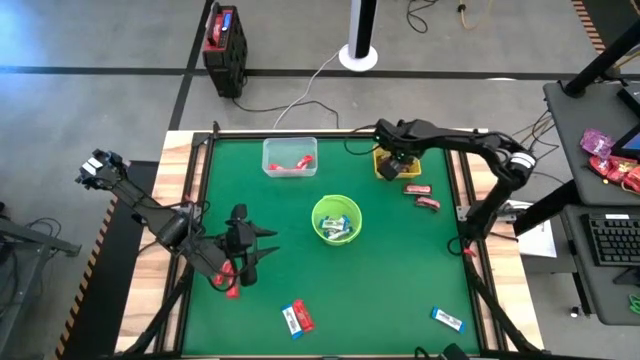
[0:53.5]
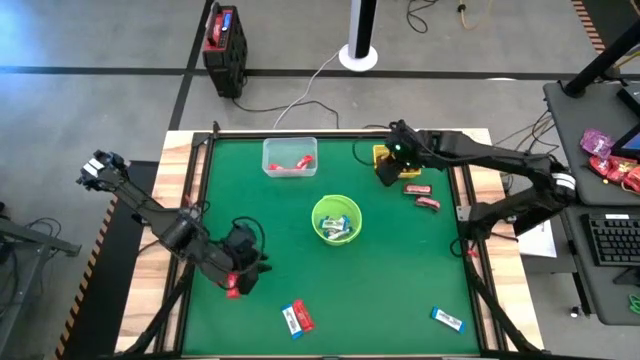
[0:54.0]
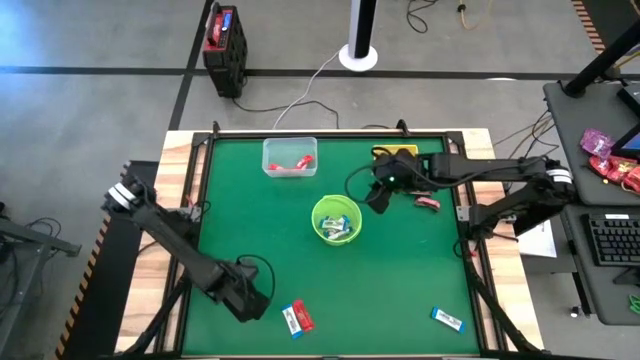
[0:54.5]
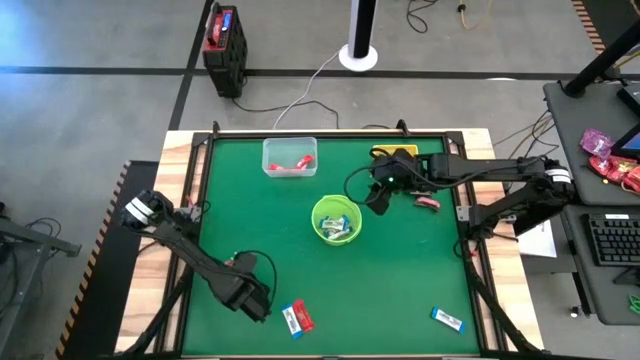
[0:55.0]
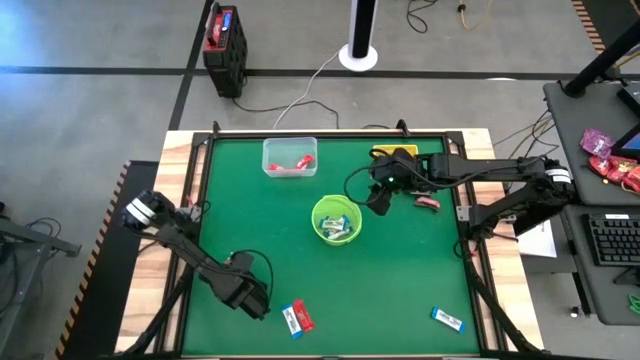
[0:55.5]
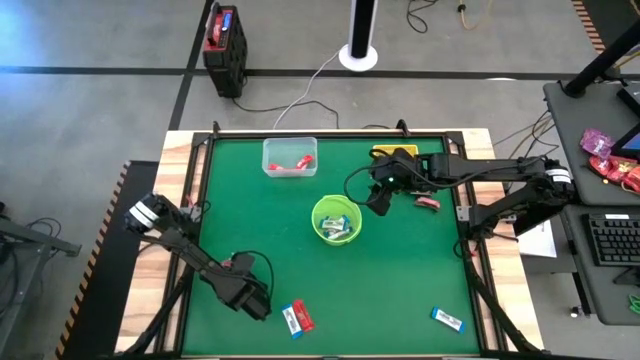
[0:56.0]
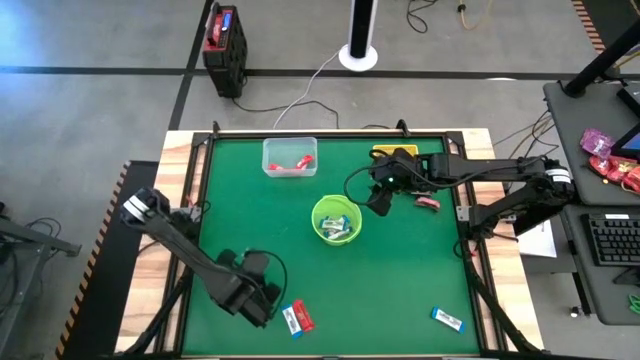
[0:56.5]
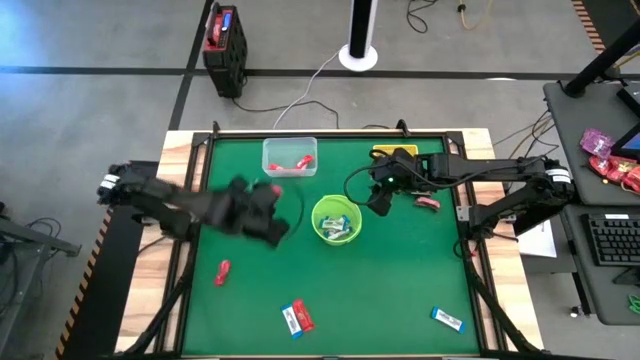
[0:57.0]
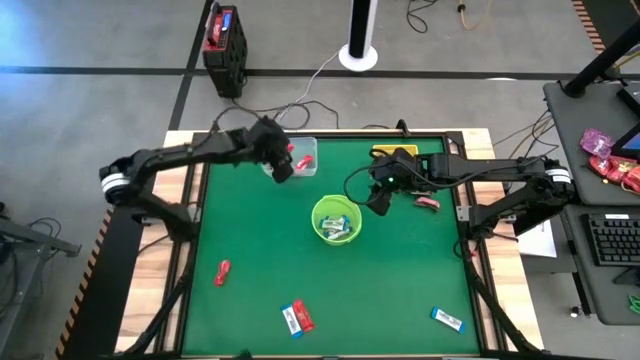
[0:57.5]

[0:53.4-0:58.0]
Task: Sort candy by brand, put in halloween buckets
Put the red chocolate into the transparent bin

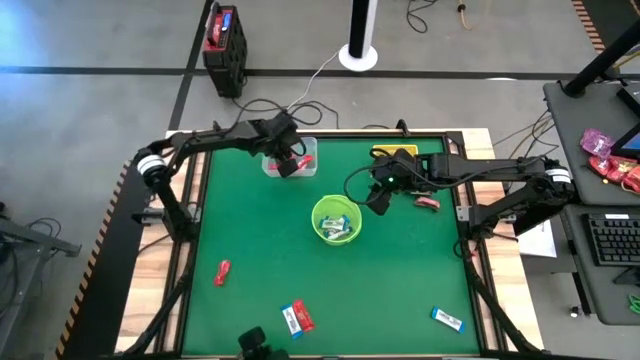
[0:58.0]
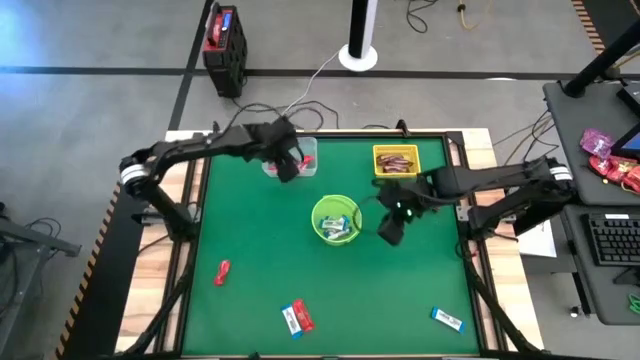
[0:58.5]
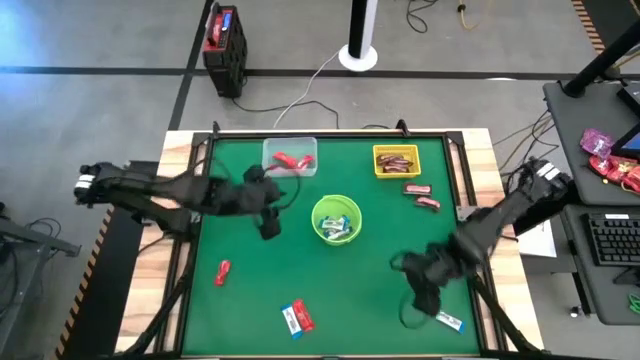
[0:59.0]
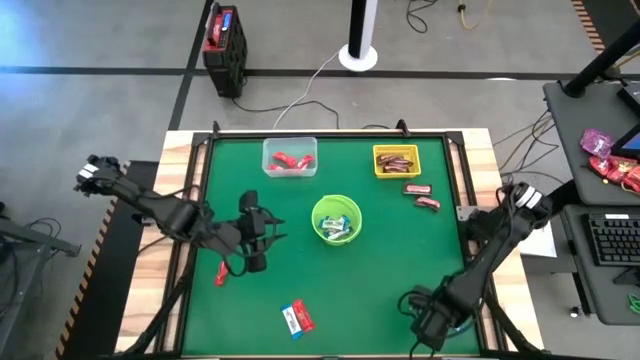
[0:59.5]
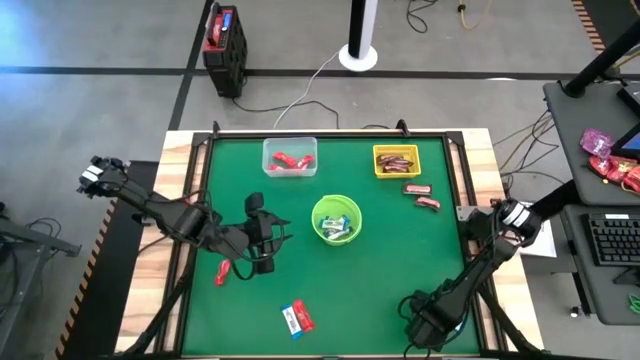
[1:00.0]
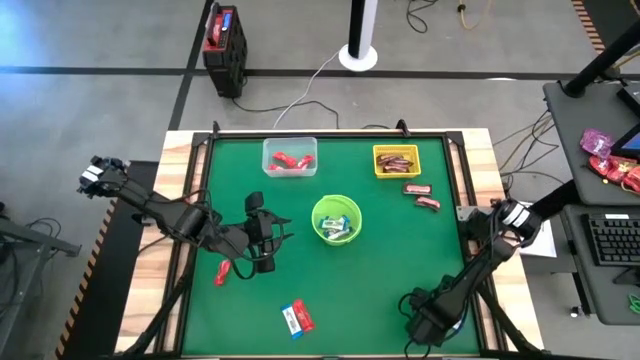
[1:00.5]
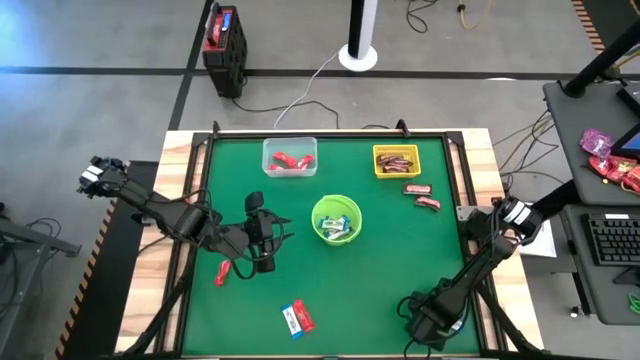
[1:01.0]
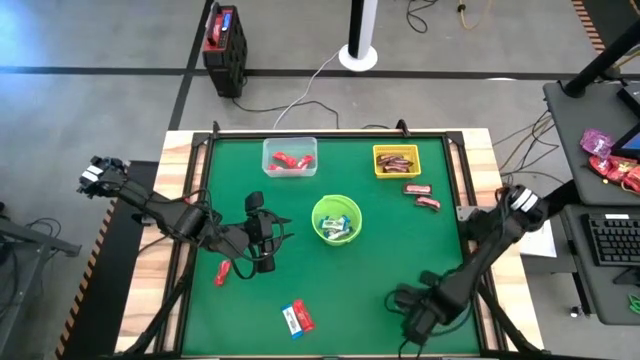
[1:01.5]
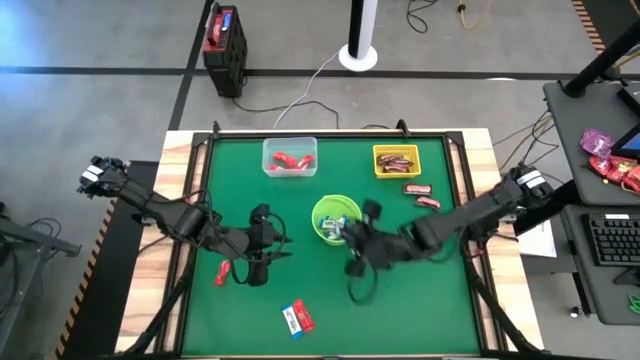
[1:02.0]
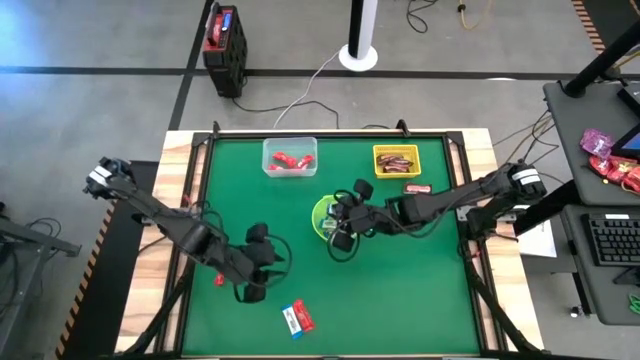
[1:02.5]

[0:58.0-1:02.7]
Put the white chocolate into the green bucket

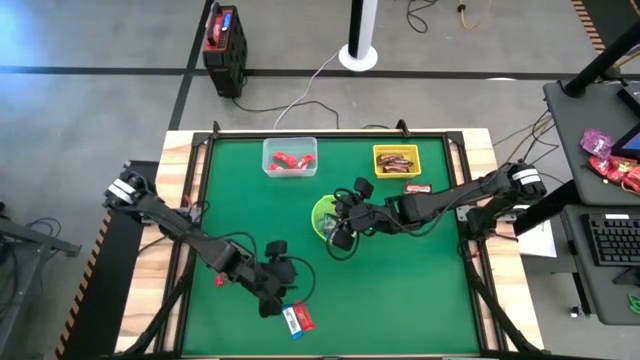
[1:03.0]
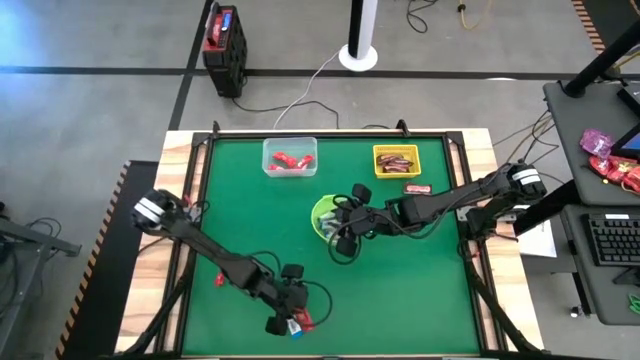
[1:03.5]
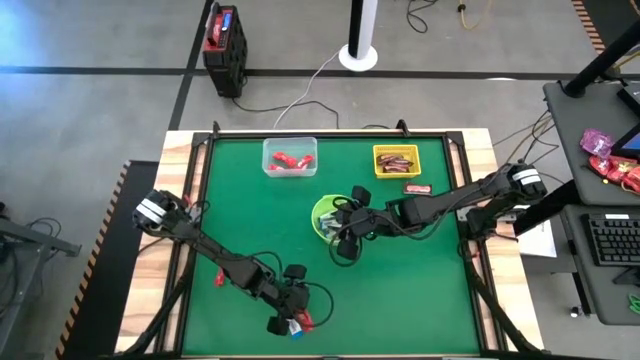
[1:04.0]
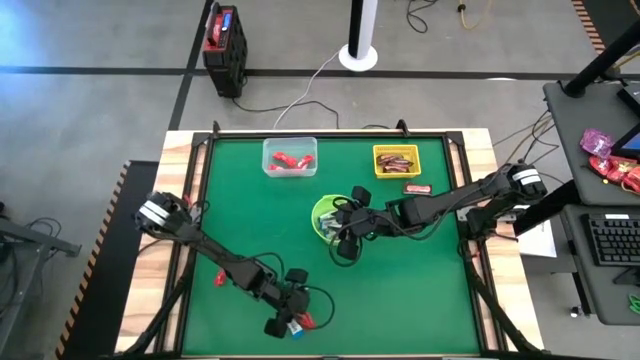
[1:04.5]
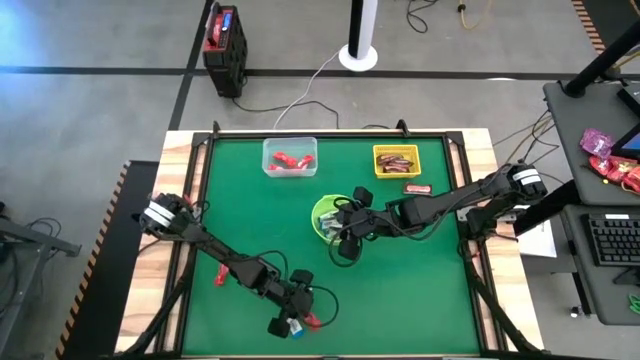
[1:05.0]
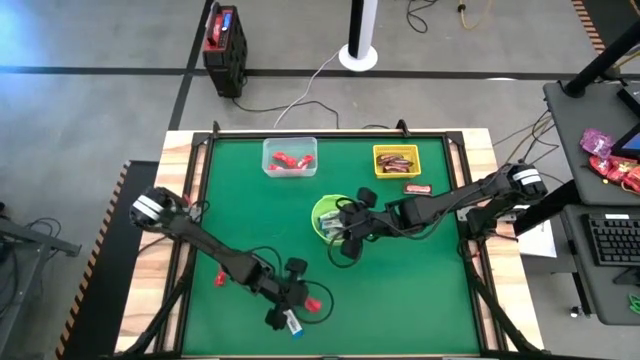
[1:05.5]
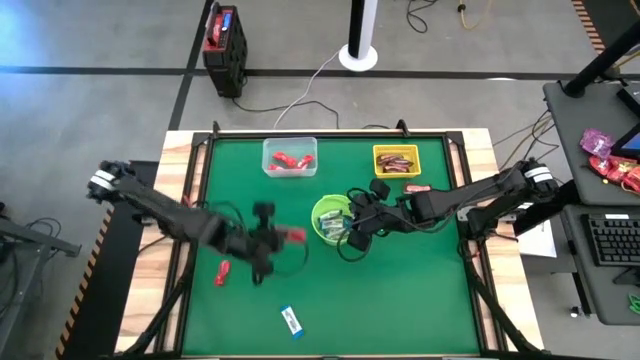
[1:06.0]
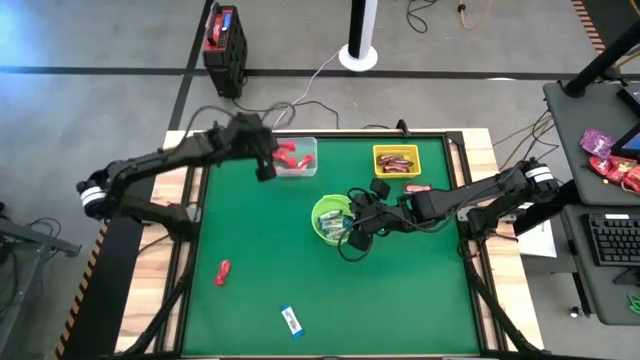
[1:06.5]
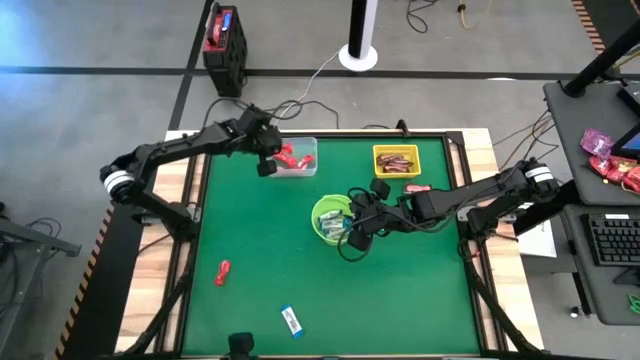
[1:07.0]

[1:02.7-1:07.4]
Put the red chocolate into the transparent bin

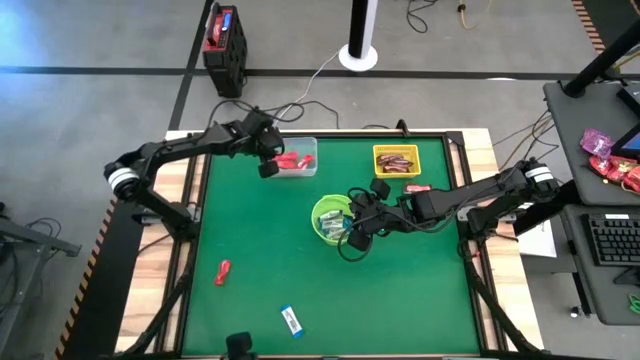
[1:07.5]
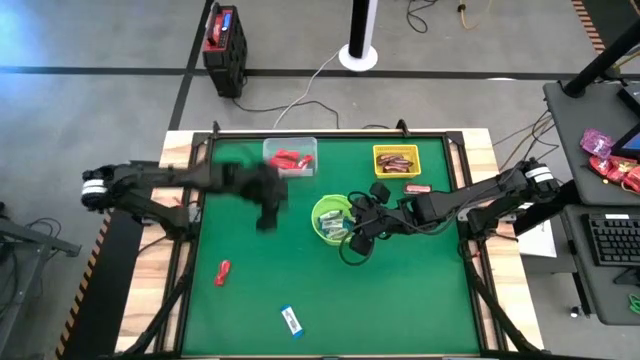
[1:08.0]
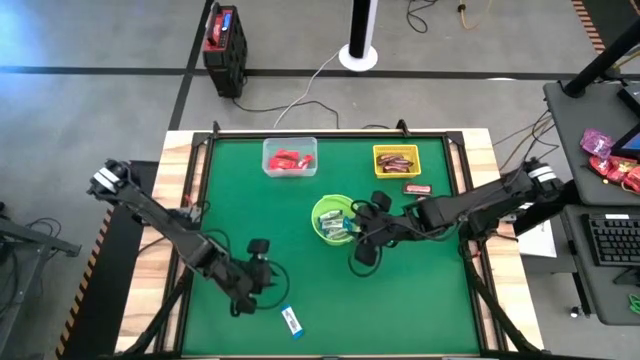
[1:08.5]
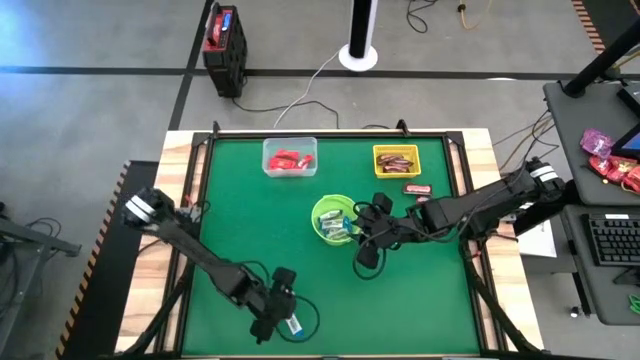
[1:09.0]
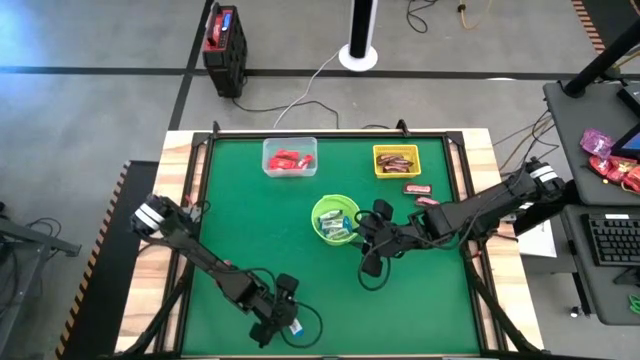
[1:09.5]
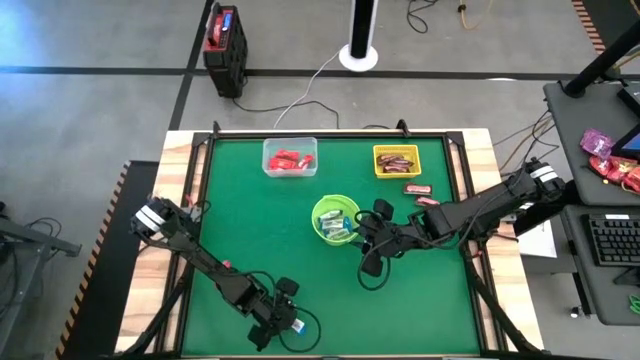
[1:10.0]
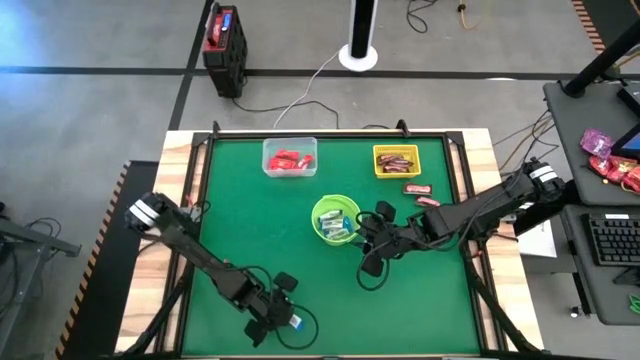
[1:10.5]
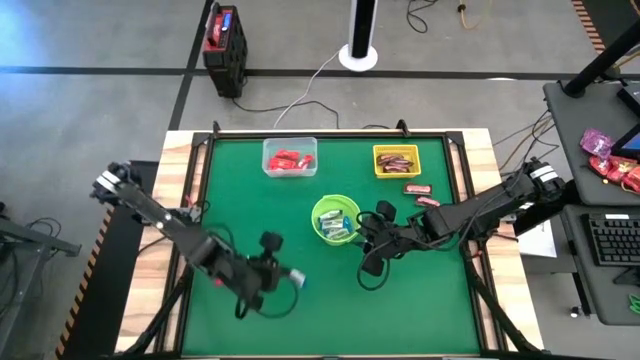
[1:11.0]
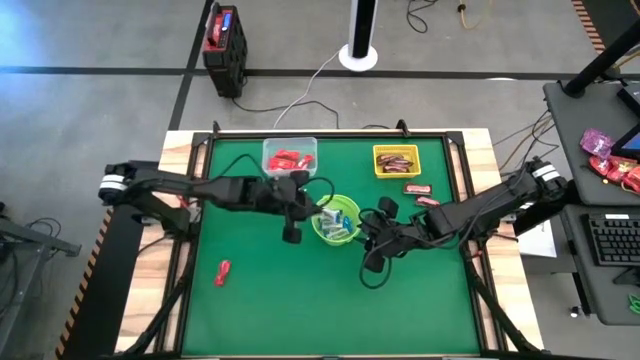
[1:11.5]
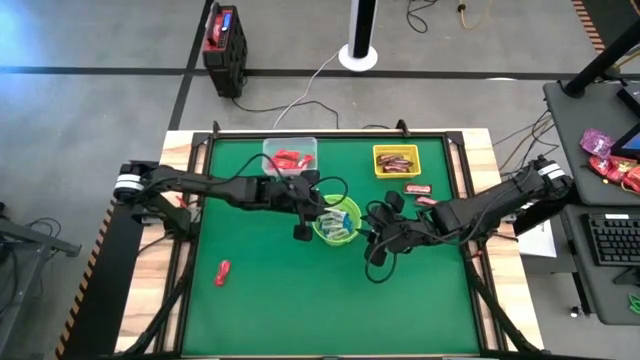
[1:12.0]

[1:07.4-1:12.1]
Put the white chocolate into the green bucket

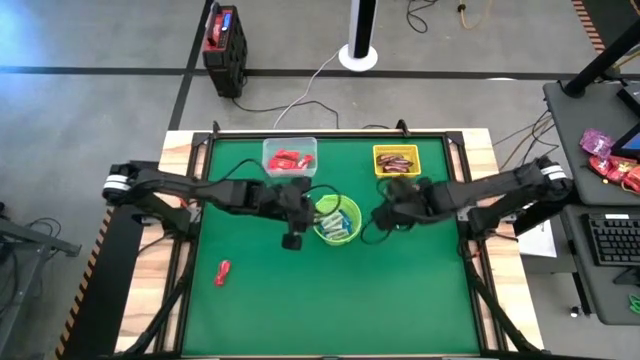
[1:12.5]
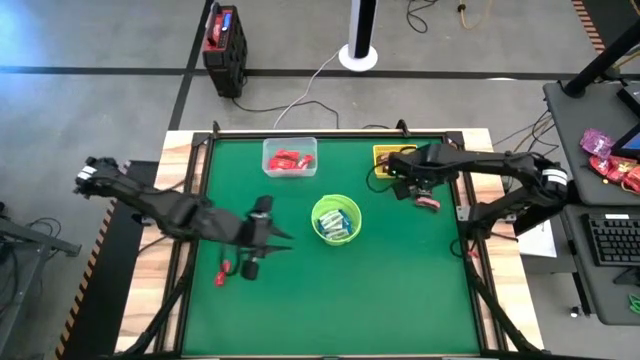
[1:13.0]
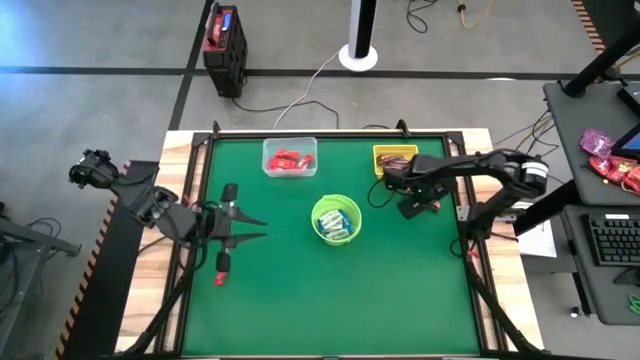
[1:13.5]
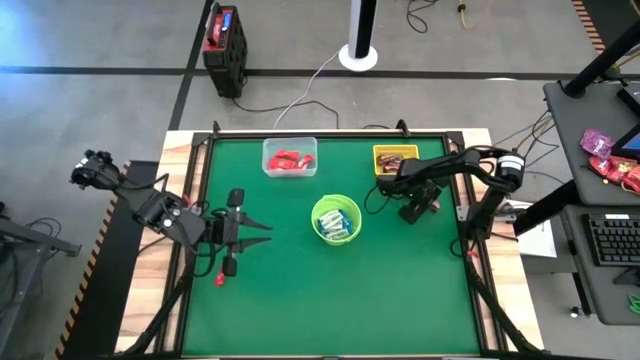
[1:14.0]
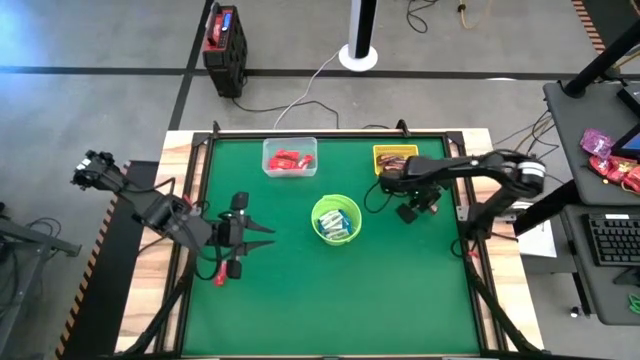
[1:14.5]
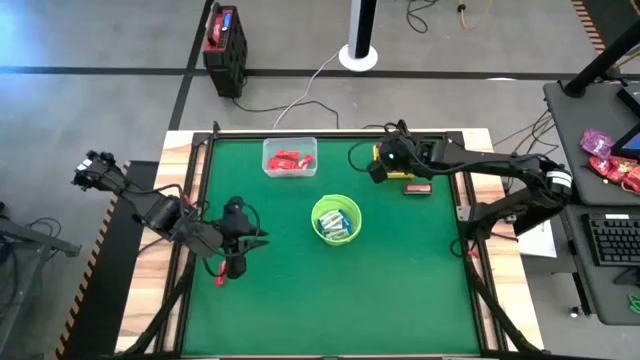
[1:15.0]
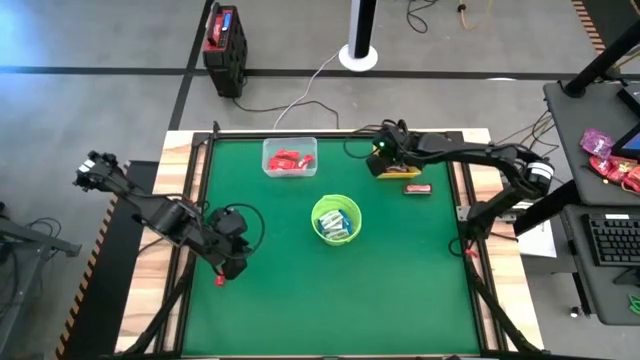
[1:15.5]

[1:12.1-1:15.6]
Put the brown chocolate into the yellow bin
